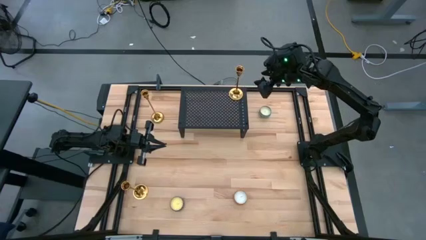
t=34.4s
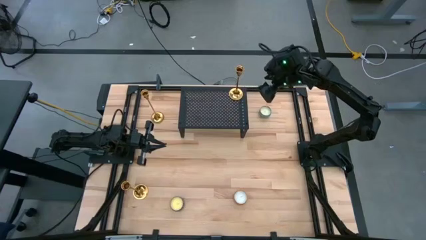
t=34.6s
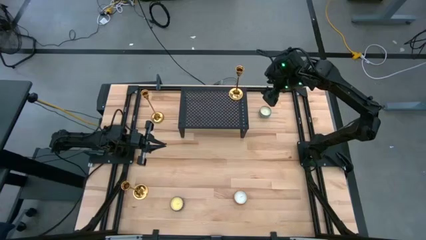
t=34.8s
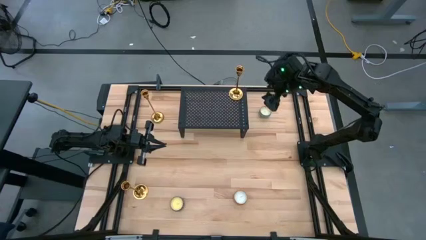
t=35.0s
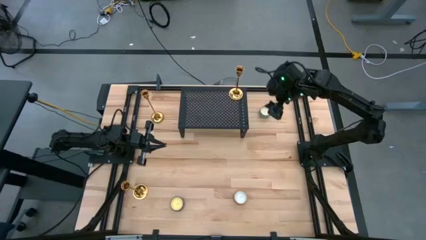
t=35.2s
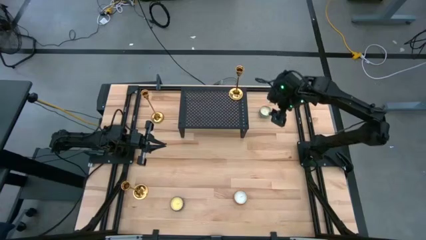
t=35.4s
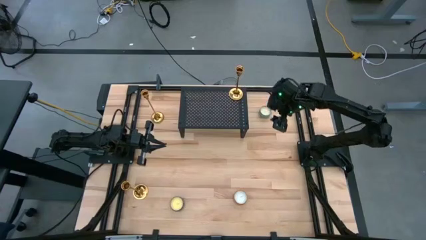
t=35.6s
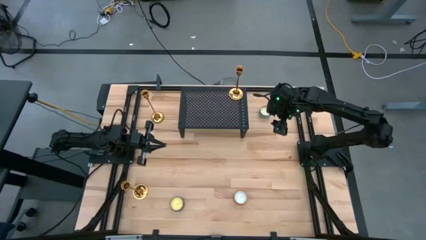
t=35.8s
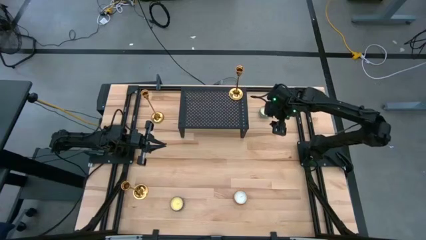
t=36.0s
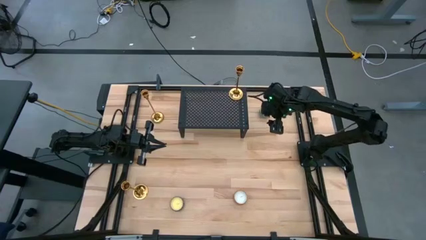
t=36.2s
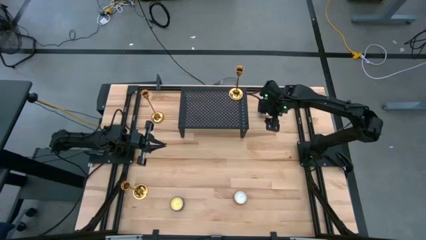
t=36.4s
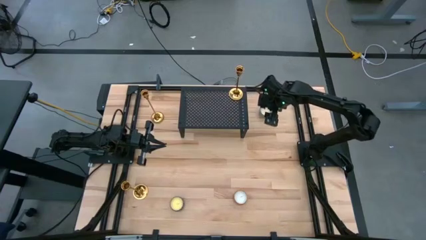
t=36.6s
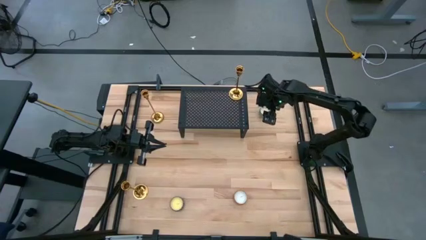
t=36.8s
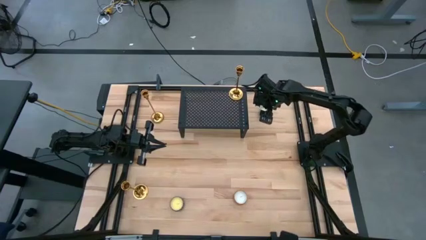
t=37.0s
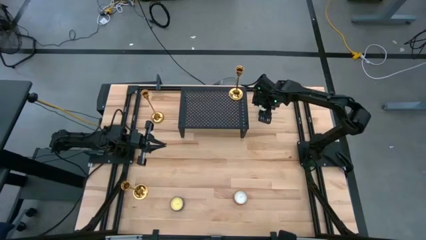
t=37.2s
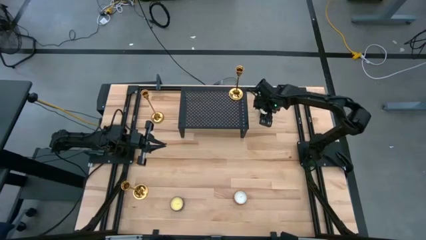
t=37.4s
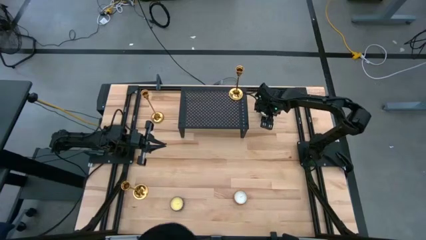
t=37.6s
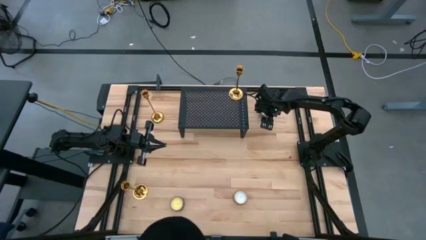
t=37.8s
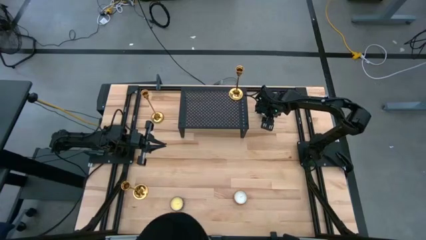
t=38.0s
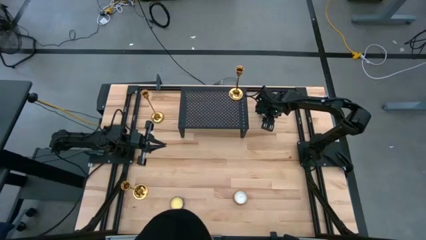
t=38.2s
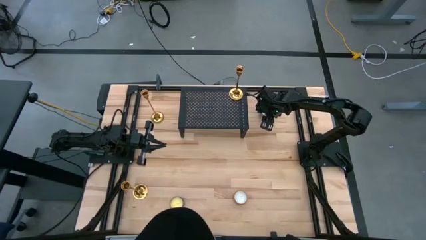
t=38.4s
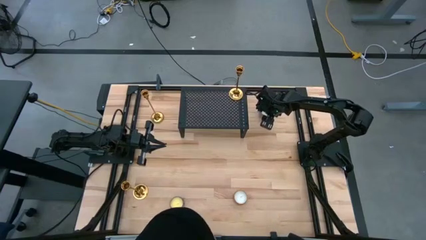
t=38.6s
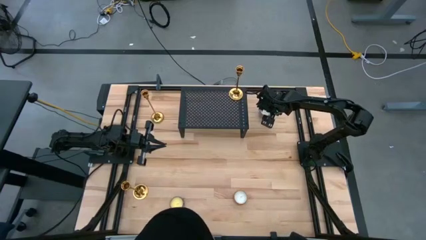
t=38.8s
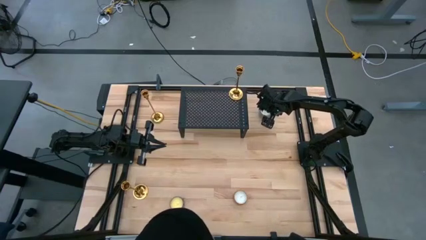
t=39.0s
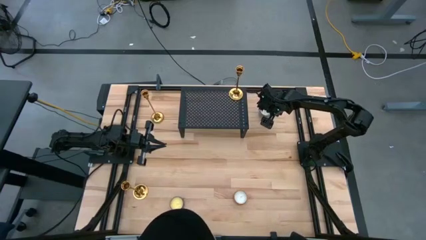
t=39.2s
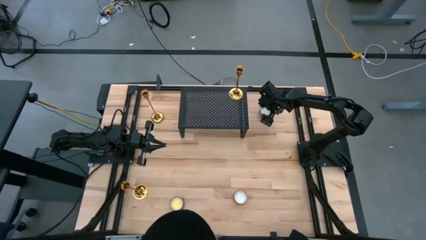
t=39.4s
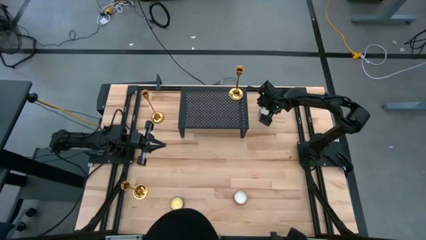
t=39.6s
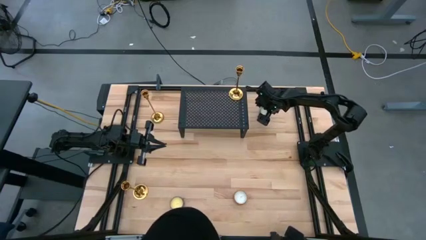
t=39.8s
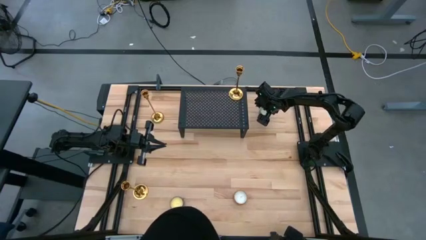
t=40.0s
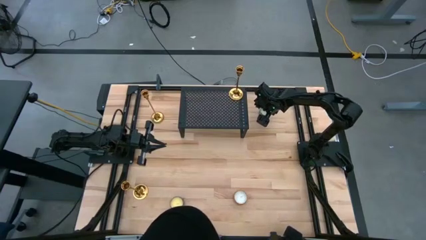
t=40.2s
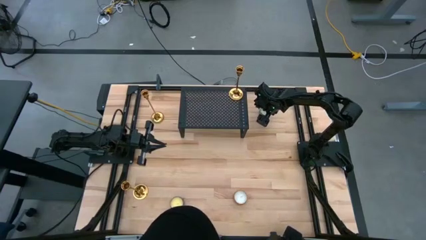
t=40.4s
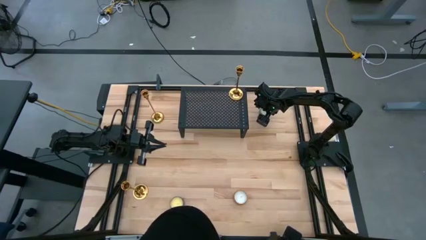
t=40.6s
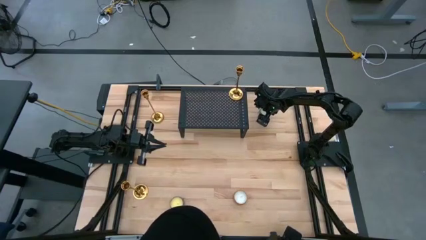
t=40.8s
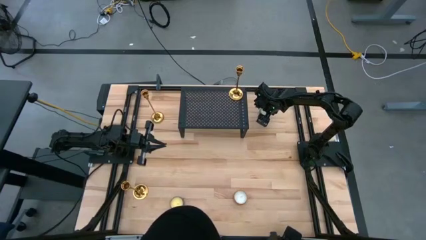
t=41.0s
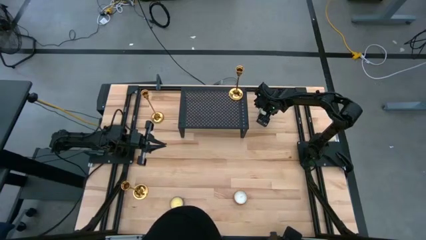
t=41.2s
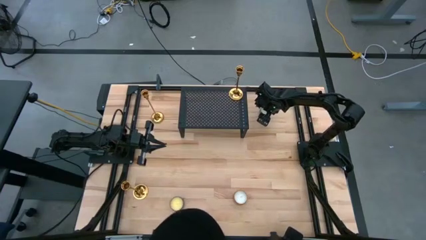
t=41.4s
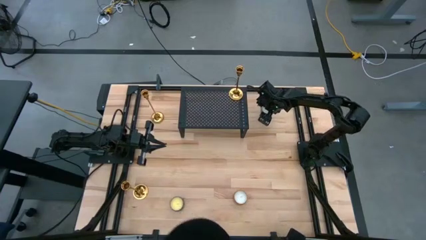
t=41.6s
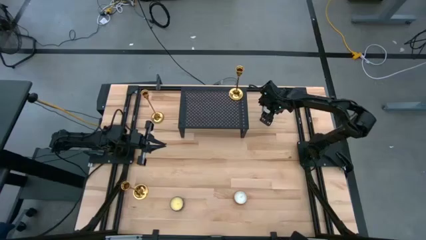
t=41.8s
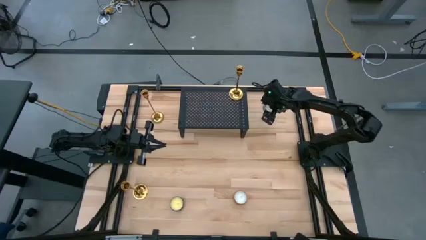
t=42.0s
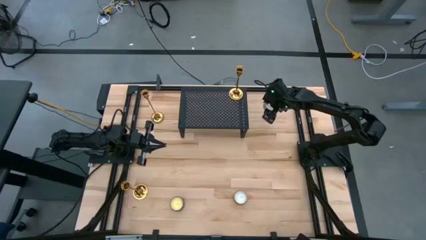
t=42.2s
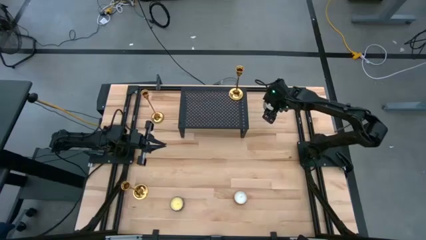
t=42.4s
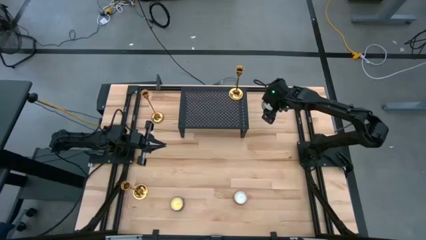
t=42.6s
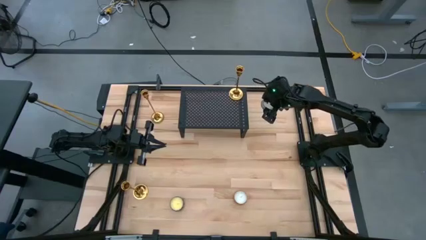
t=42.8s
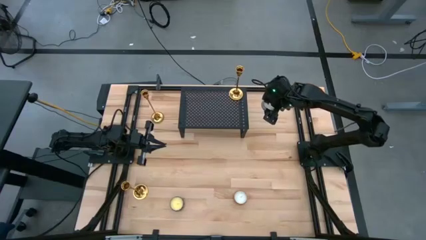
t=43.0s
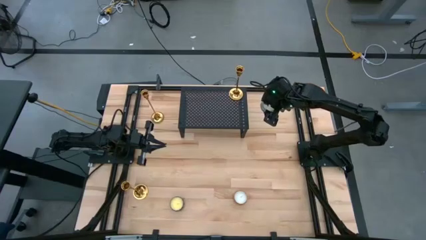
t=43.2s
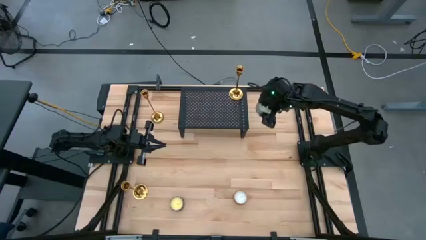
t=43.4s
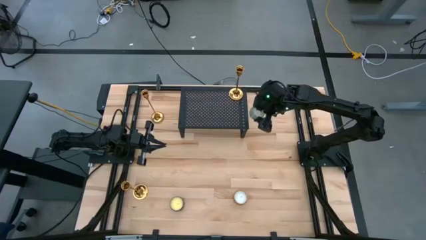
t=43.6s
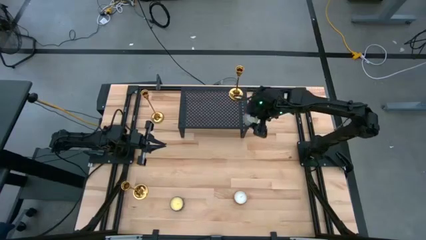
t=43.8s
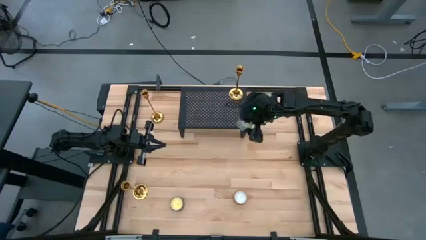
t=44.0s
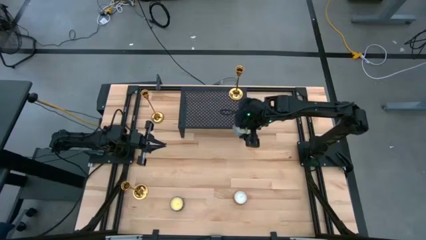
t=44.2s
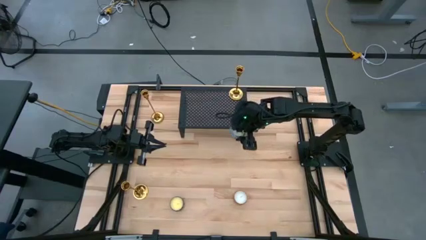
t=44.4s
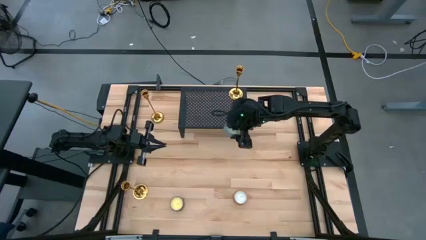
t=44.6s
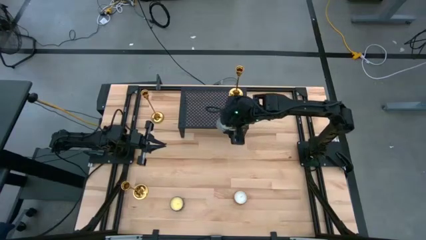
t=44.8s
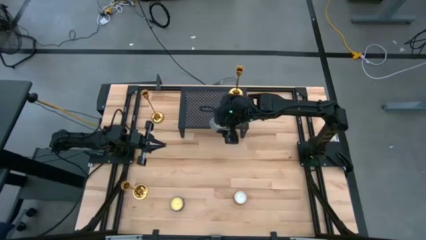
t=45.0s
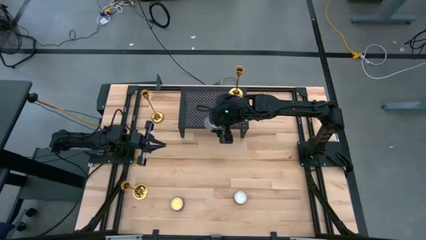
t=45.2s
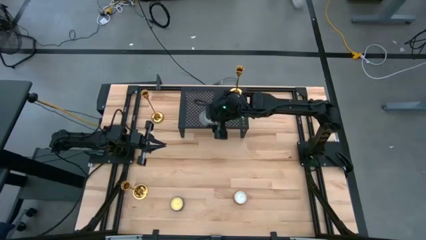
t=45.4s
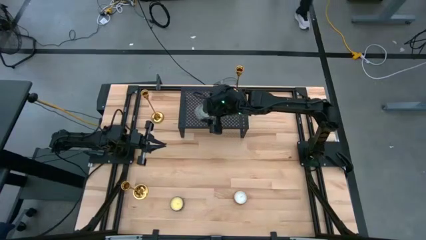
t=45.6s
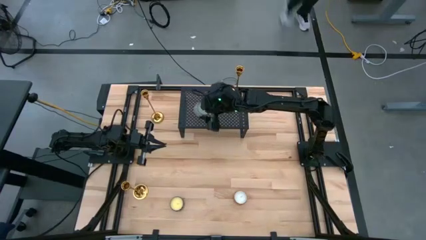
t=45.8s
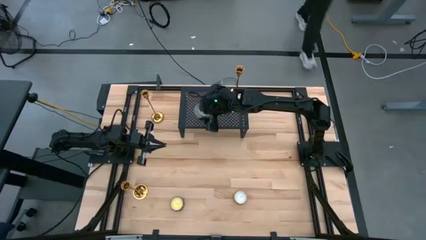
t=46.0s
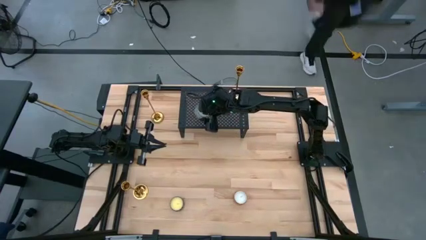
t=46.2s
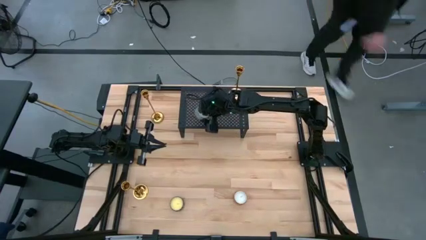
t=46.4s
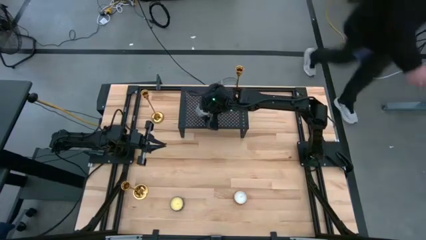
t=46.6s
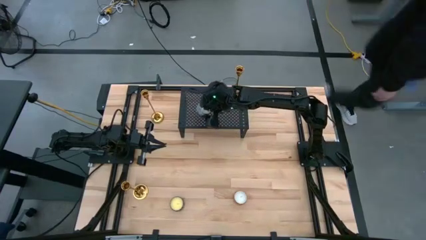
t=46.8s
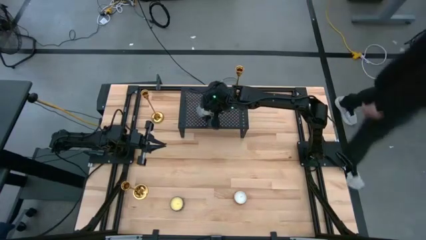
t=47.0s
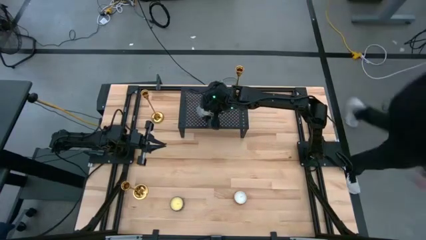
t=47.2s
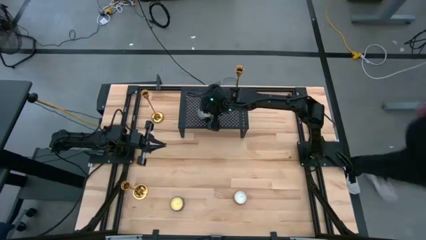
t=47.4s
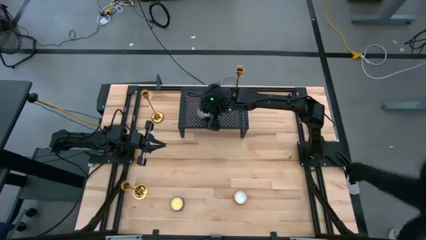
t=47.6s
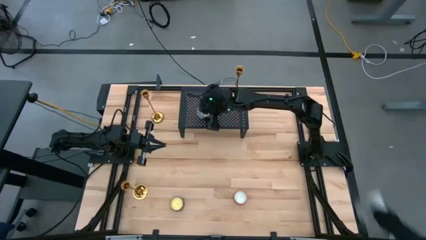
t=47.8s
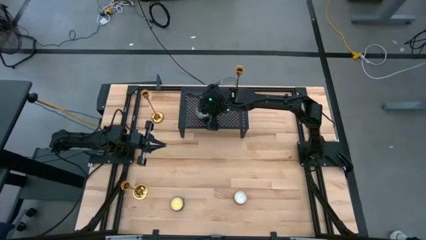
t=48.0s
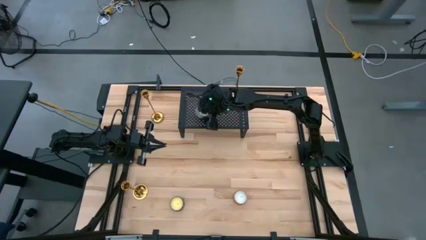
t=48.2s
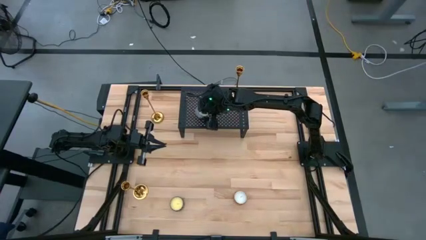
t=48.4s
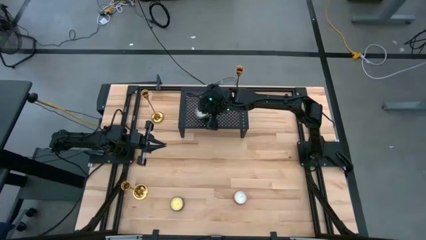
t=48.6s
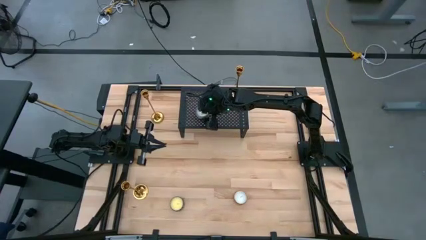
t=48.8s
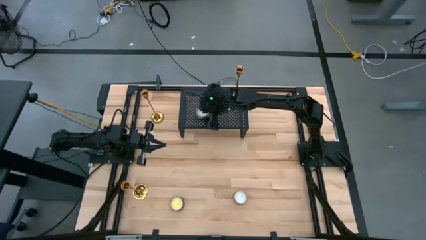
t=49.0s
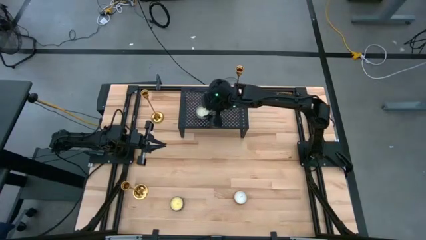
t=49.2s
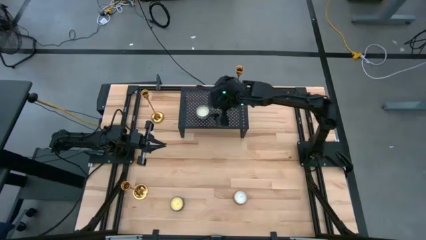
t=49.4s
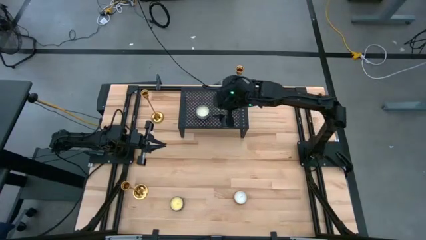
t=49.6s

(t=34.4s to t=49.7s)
Task: Pick & Place candle stick holders
Put the blue scented candle on the shelf
